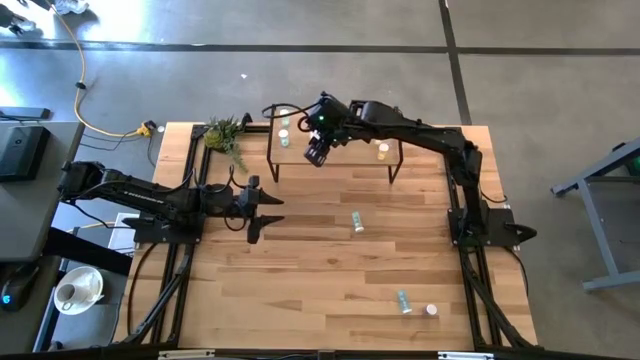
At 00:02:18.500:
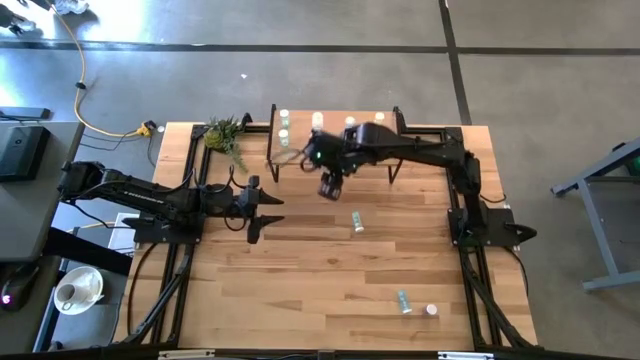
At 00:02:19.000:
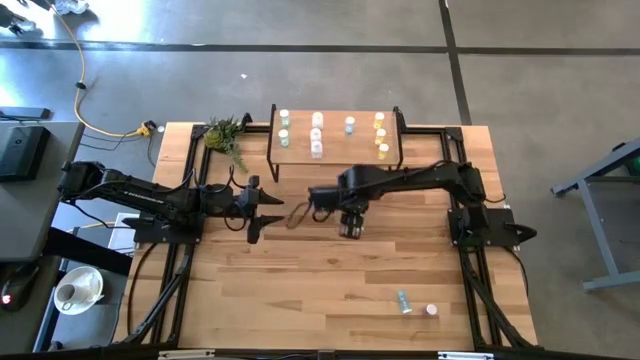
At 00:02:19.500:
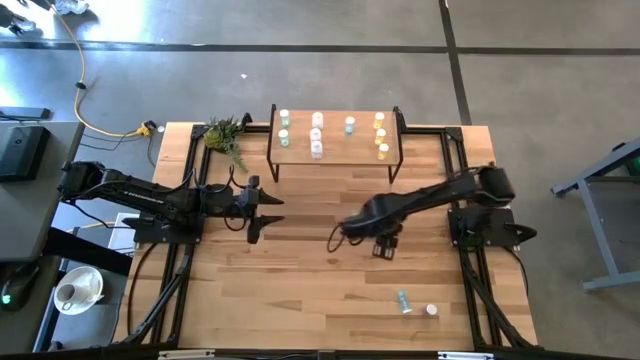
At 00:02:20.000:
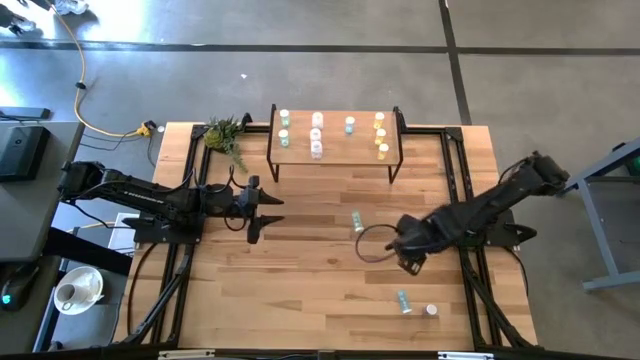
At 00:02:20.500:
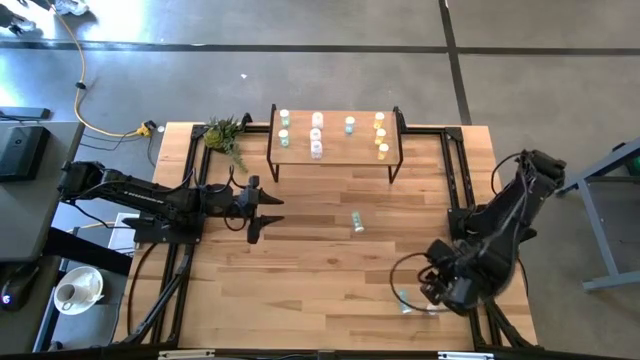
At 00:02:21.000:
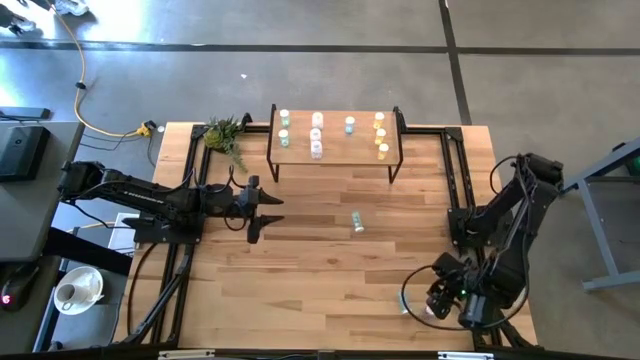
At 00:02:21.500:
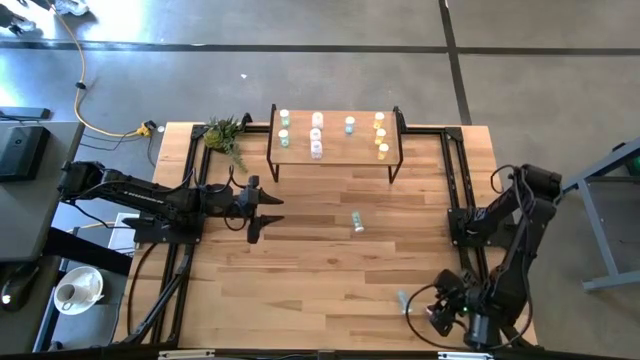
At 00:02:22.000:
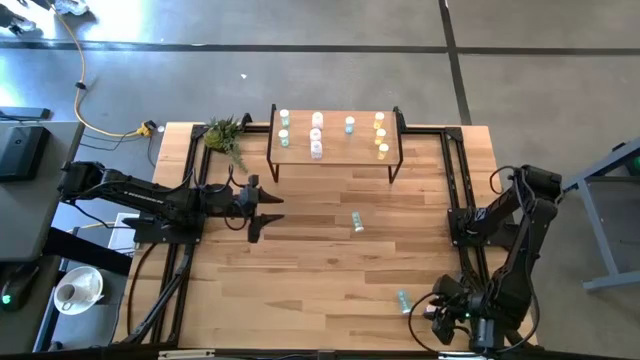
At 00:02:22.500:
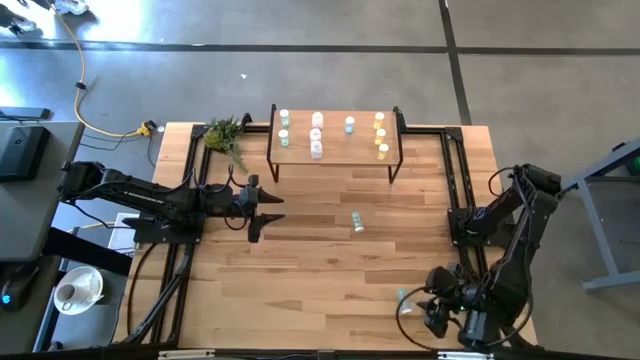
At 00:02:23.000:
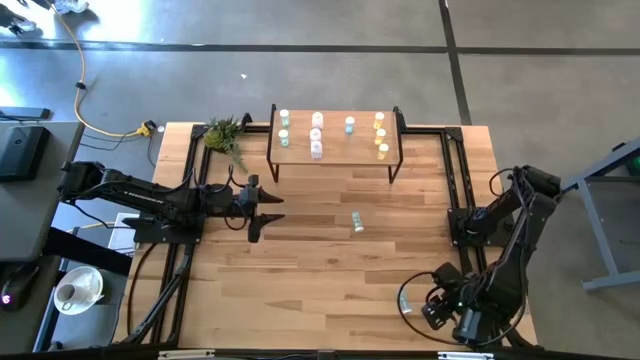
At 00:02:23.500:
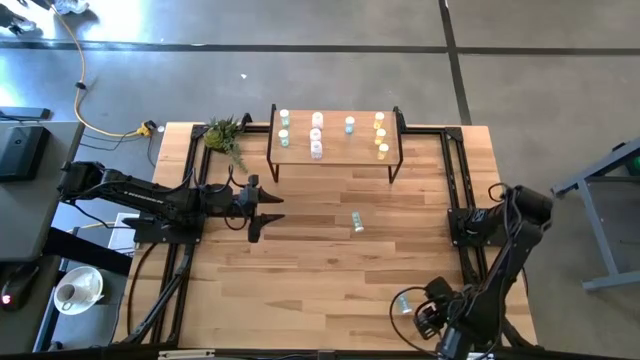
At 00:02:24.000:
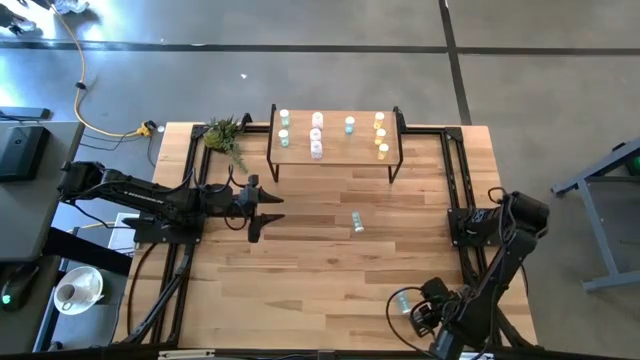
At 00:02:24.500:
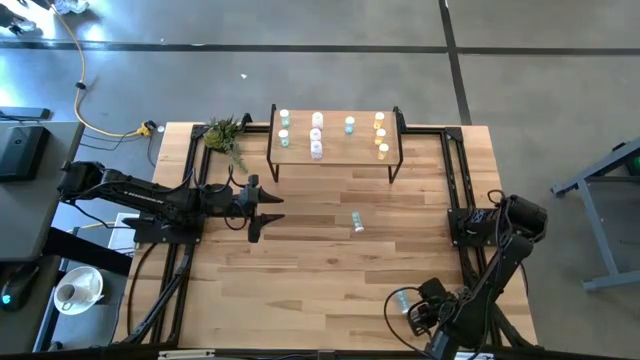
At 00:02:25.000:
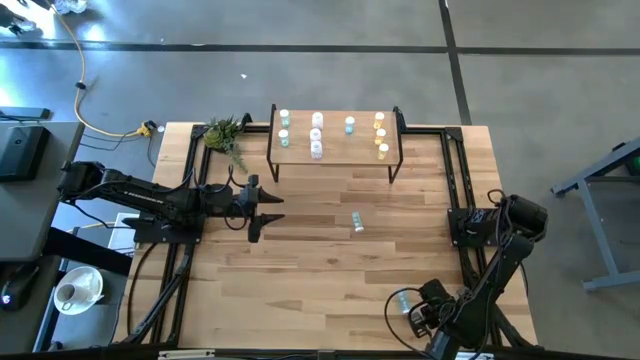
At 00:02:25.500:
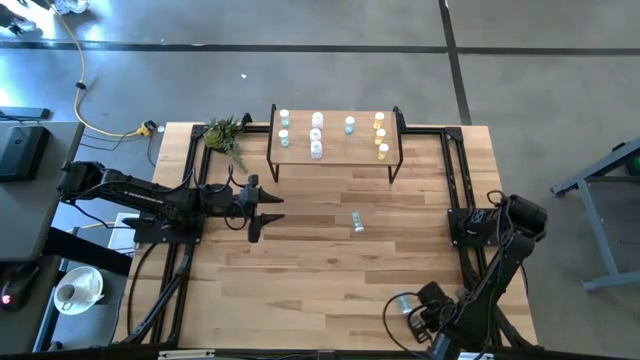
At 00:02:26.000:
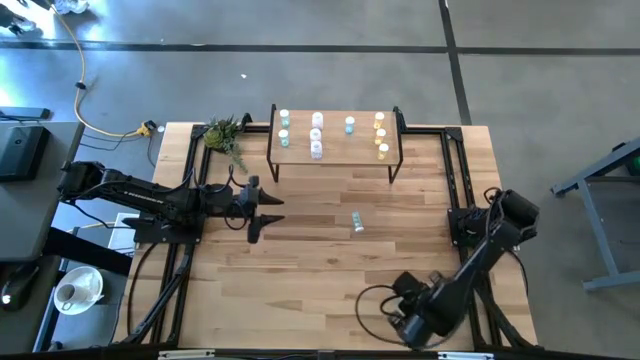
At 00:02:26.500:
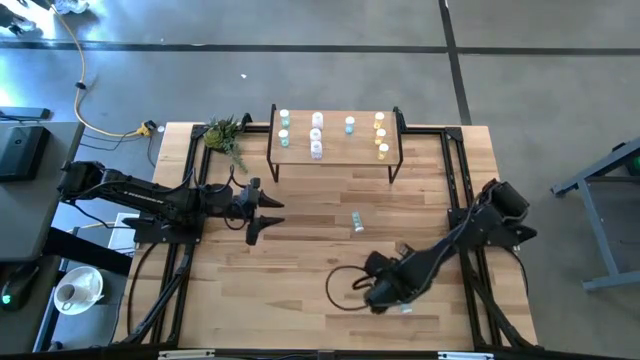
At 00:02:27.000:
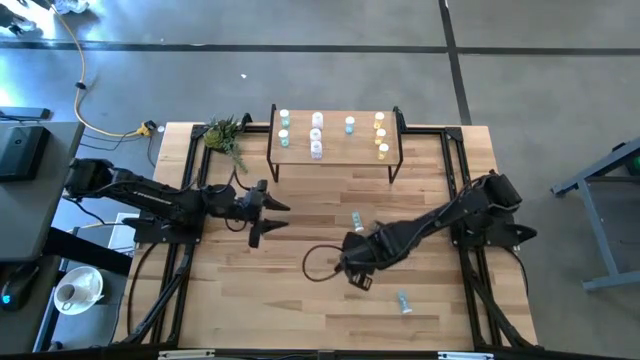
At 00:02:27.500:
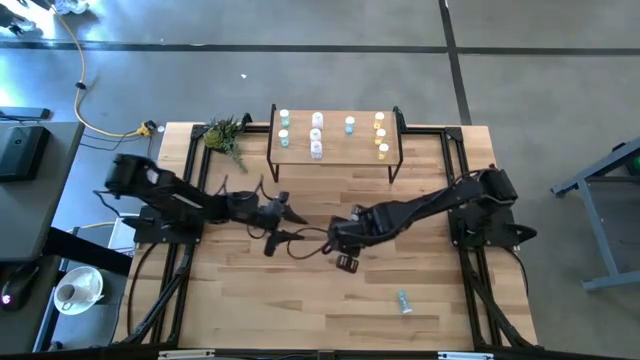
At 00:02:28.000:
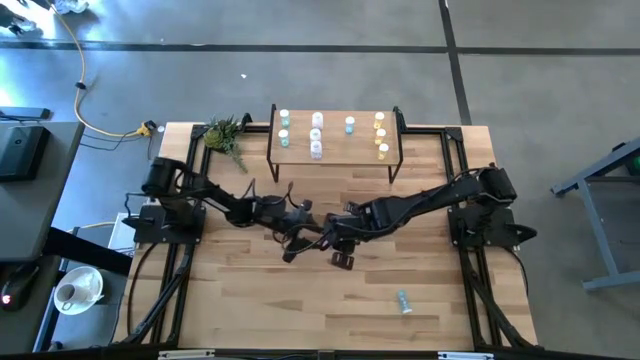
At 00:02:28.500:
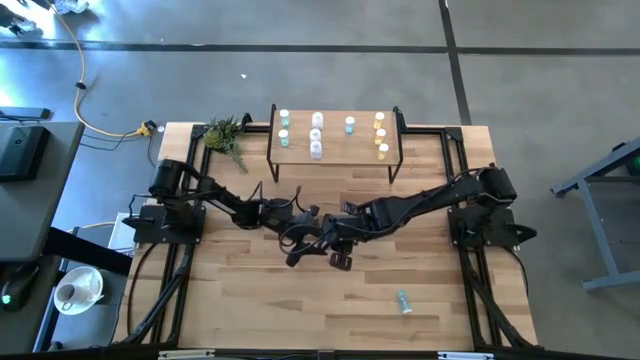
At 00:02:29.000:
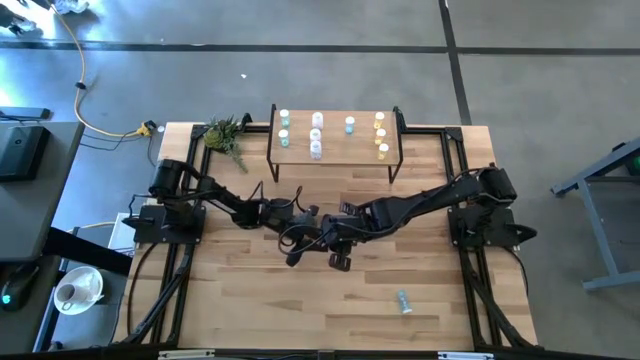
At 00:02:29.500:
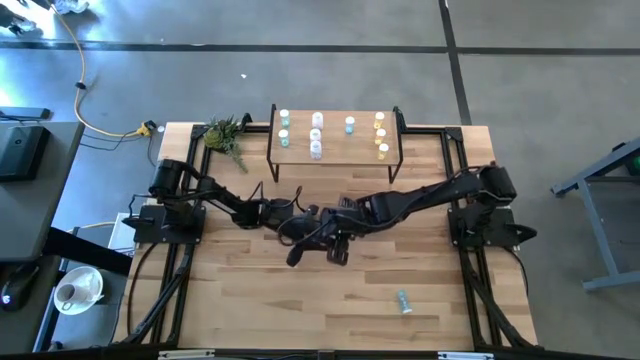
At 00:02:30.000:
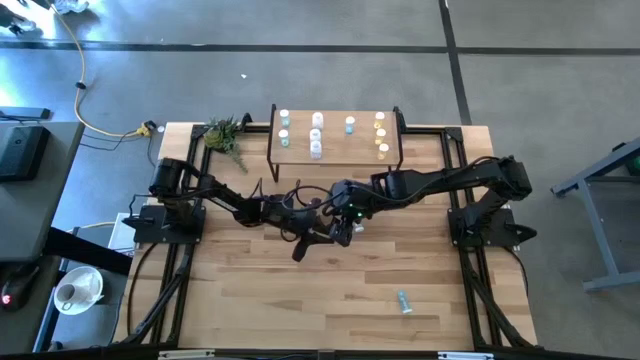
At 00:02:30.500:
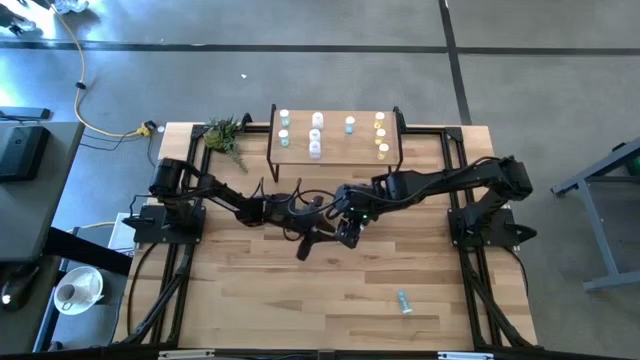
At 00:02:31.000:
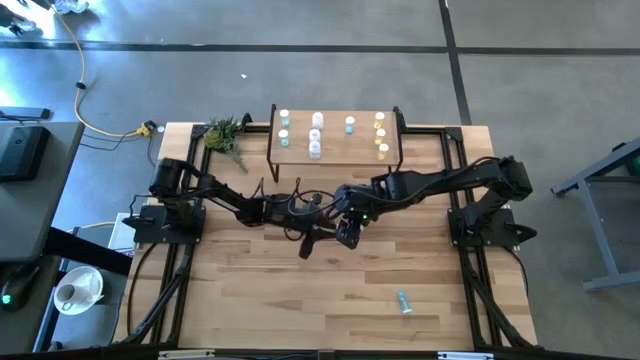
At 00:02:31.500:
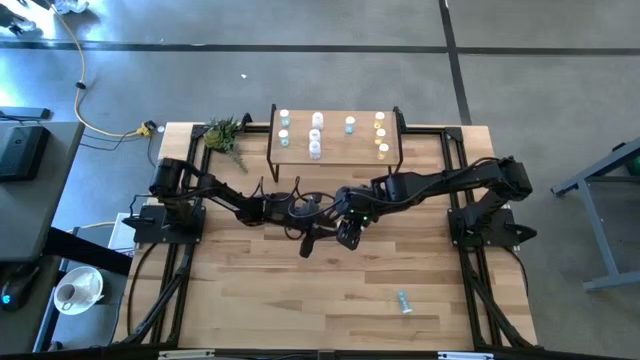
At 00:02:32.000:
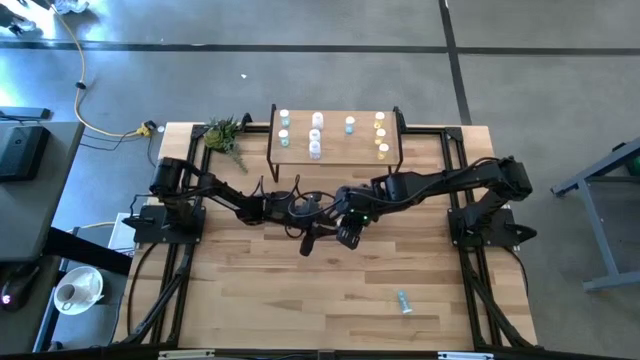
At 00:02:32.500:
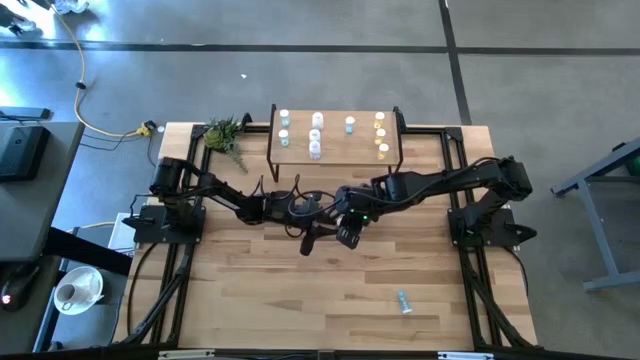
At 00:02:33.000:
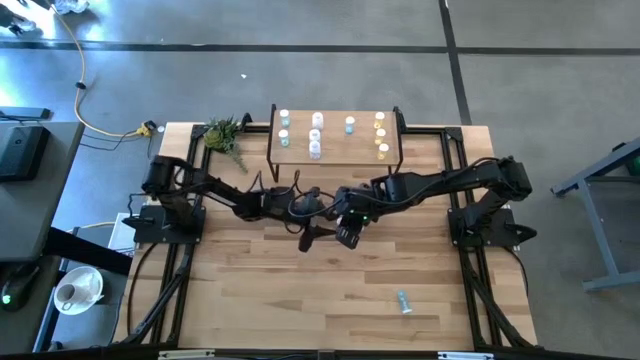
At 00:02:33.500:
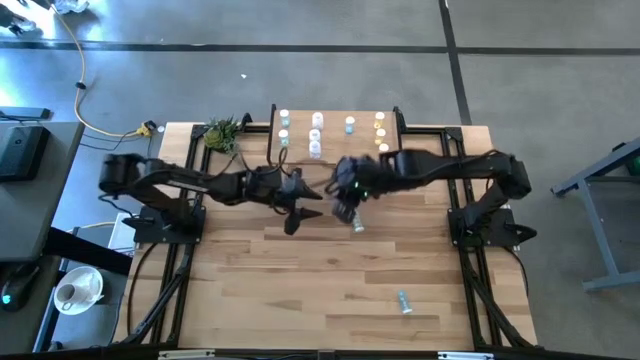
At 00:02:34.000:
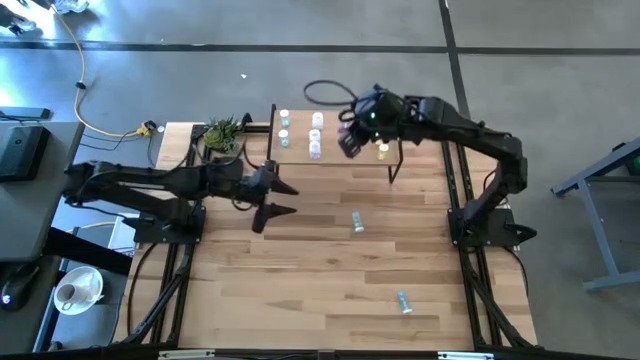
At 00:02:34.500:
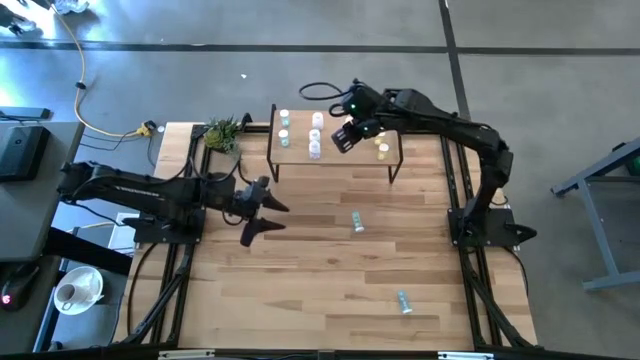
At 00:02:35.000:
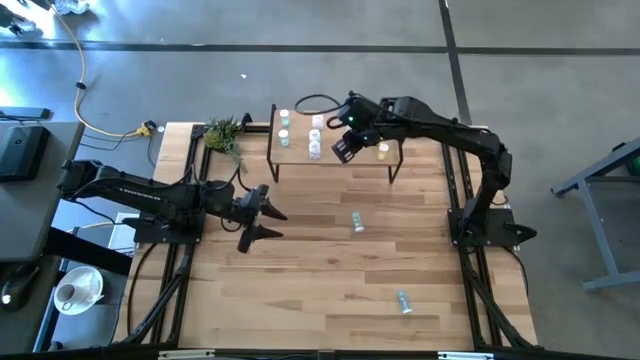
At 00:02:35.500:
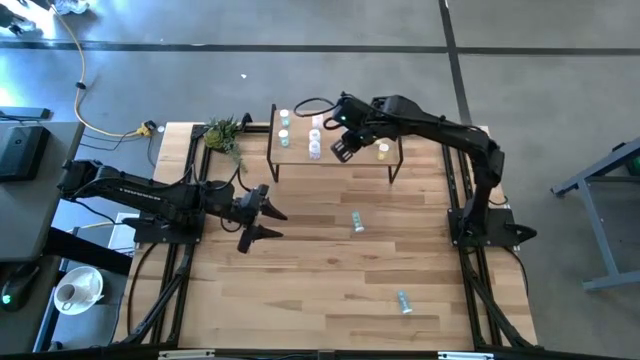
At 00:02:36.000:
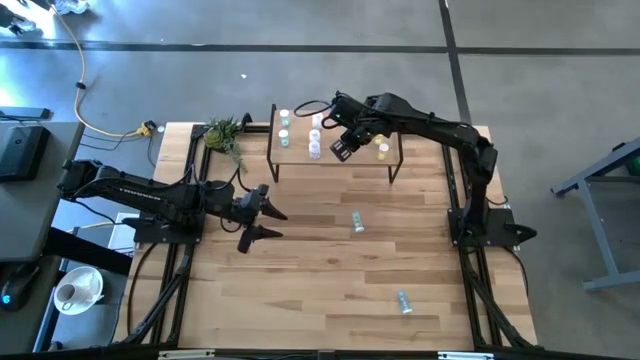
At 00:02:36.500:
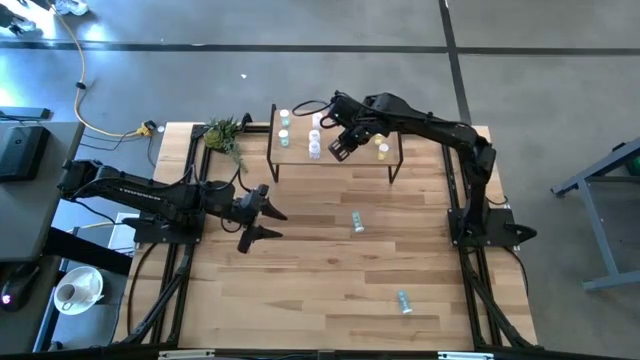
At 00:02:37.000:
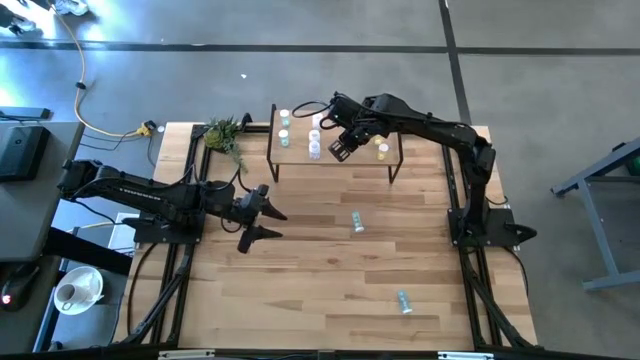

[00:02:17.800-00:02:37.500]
Task: Pick and place medicine bottles onto shelf by color
Put the bottom blue pill bottle on the shelf aligned with the other blue pill bottle
